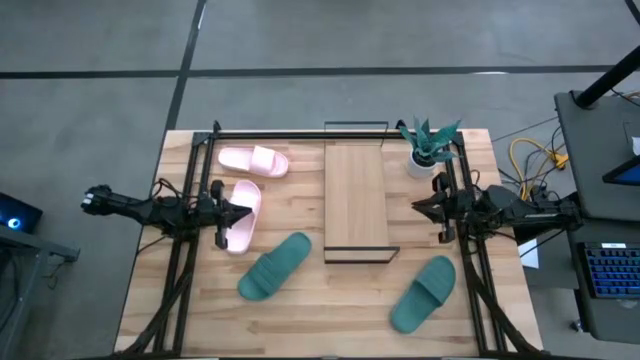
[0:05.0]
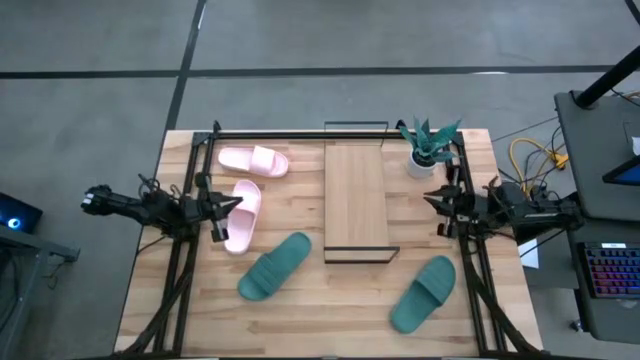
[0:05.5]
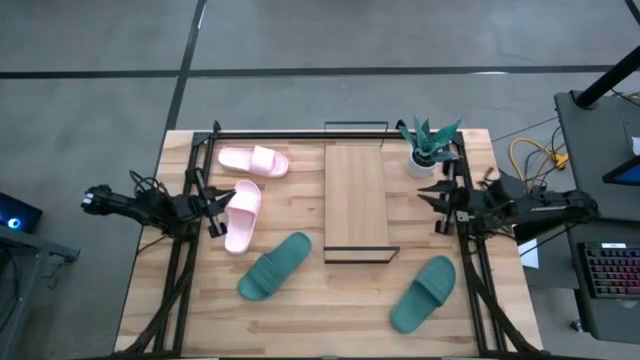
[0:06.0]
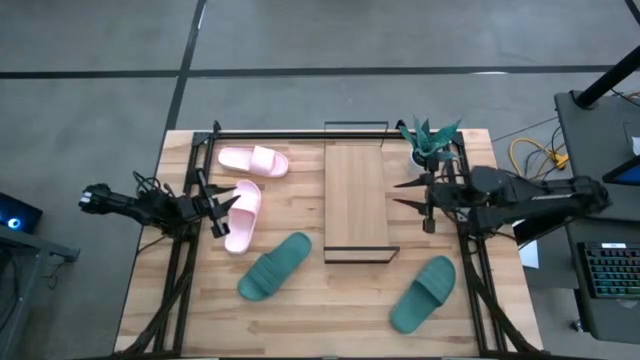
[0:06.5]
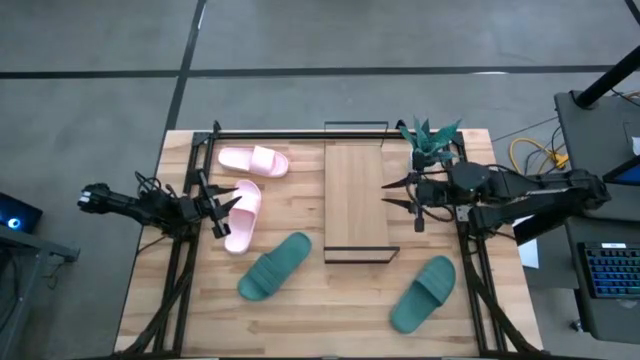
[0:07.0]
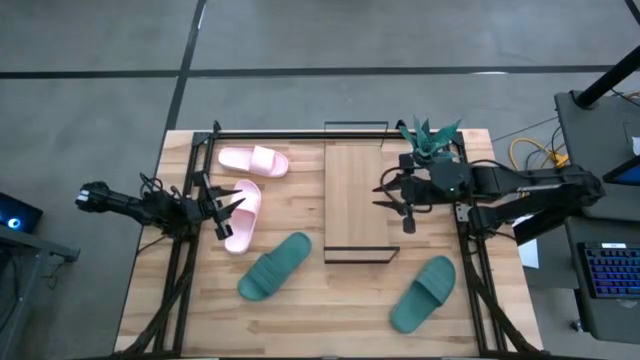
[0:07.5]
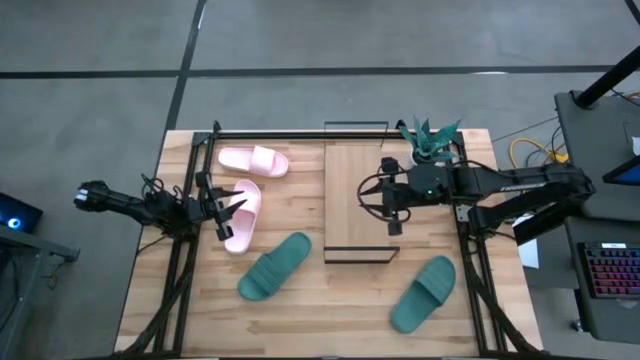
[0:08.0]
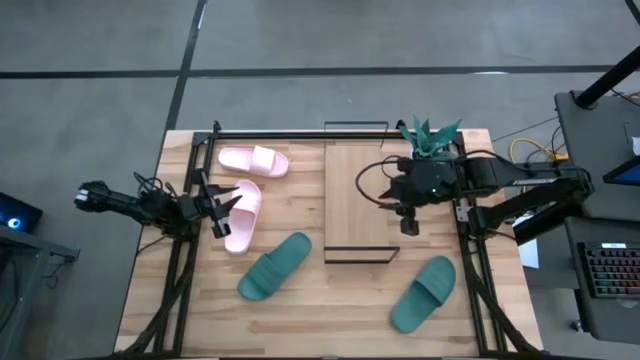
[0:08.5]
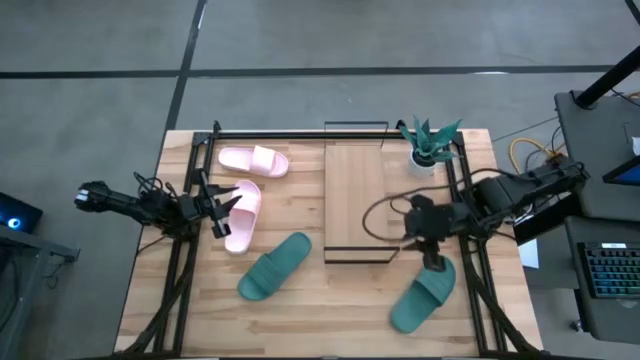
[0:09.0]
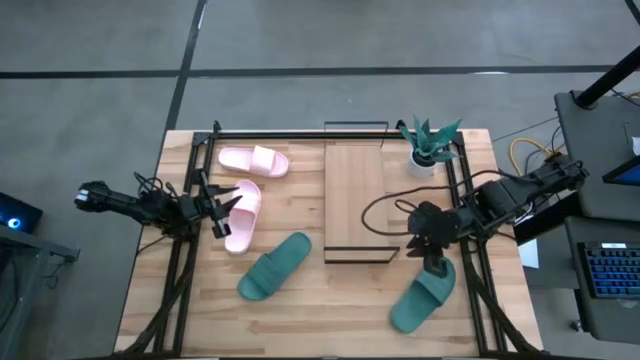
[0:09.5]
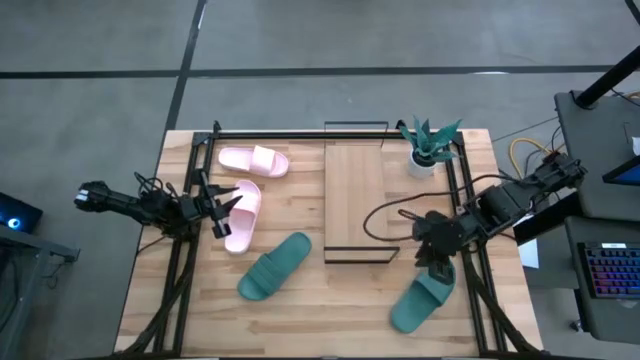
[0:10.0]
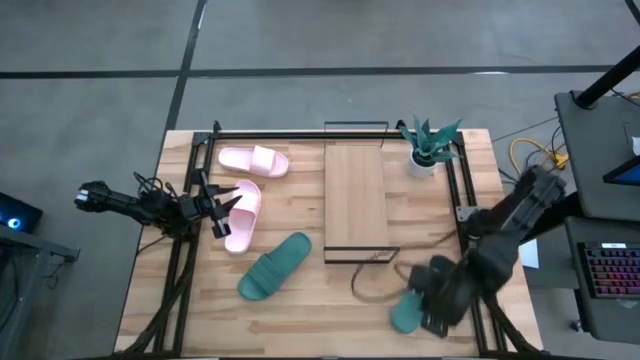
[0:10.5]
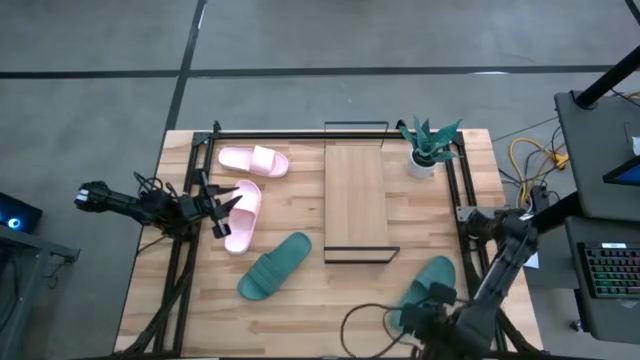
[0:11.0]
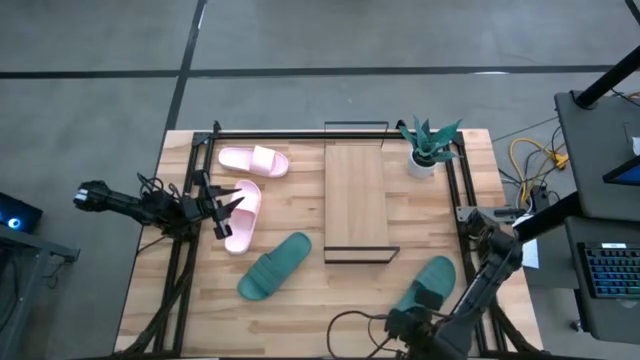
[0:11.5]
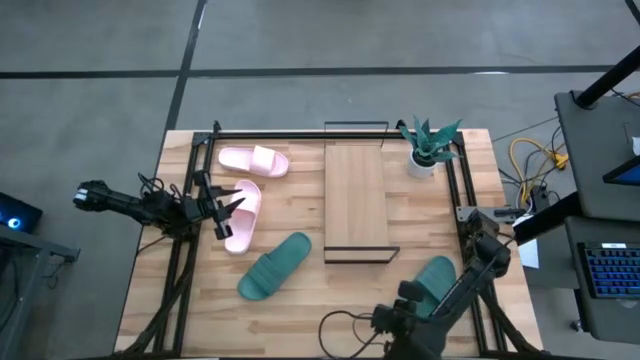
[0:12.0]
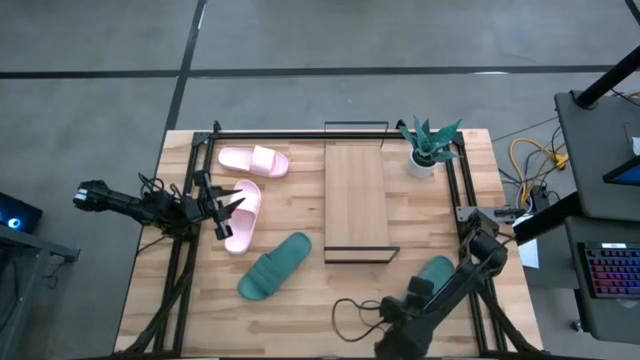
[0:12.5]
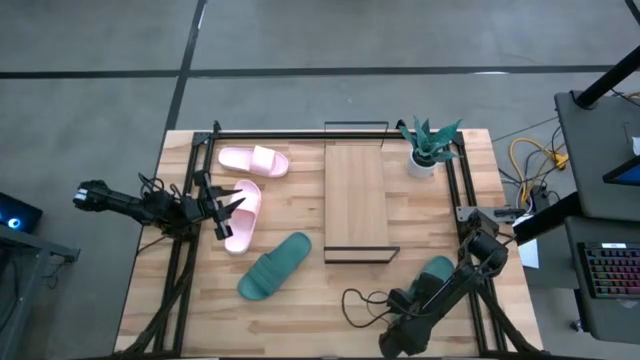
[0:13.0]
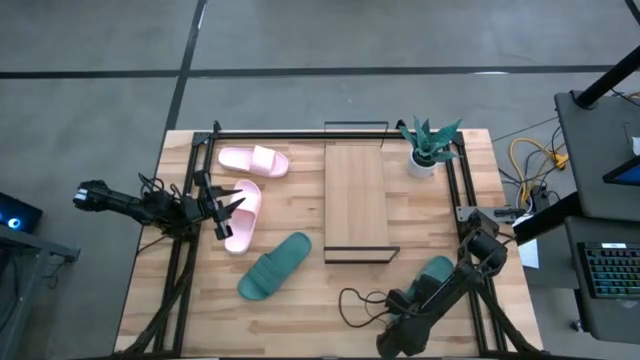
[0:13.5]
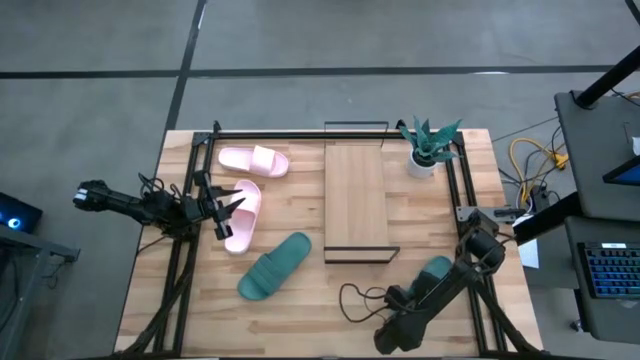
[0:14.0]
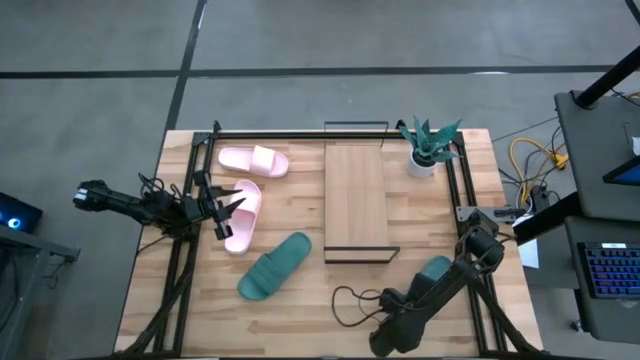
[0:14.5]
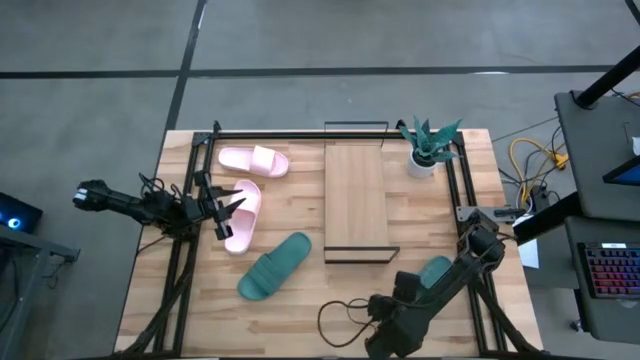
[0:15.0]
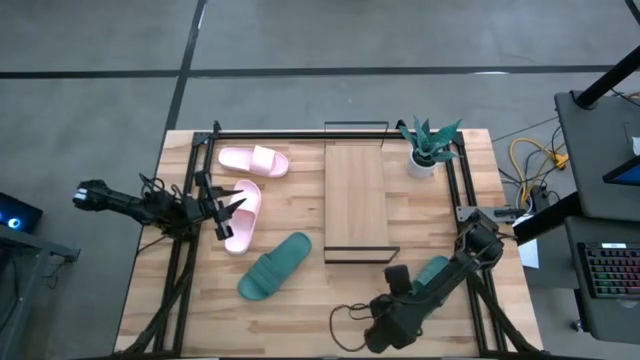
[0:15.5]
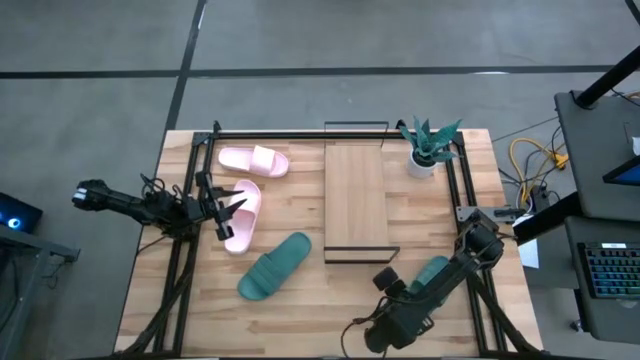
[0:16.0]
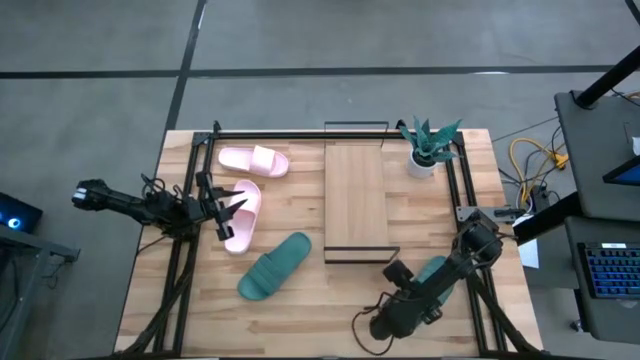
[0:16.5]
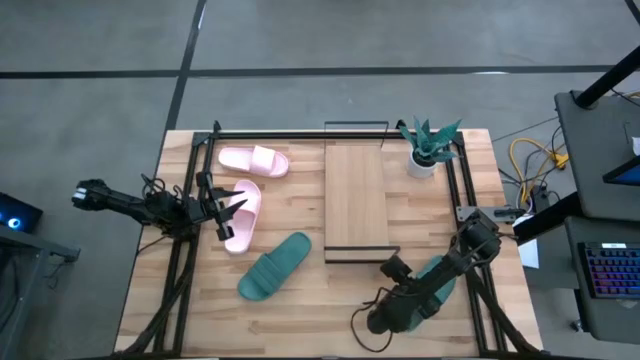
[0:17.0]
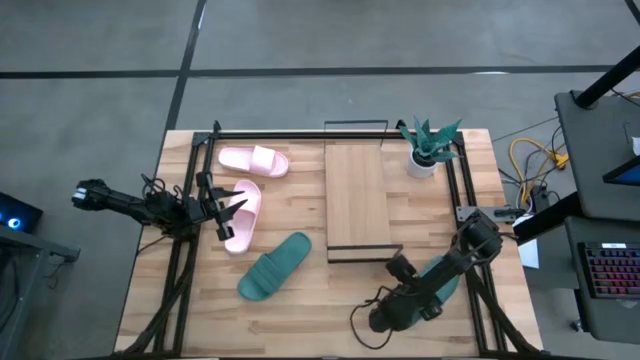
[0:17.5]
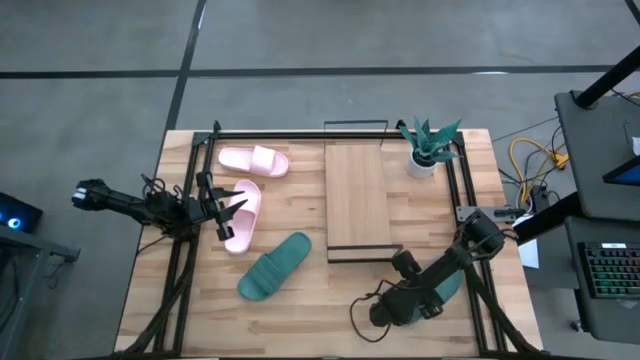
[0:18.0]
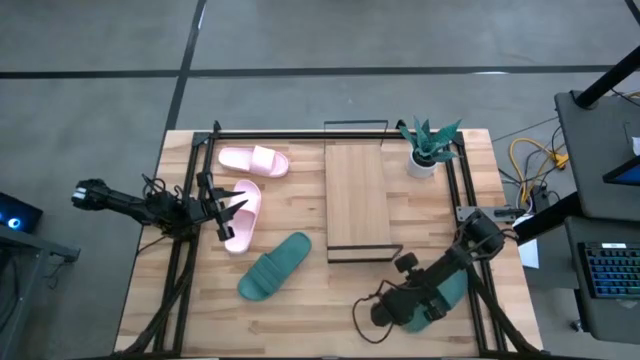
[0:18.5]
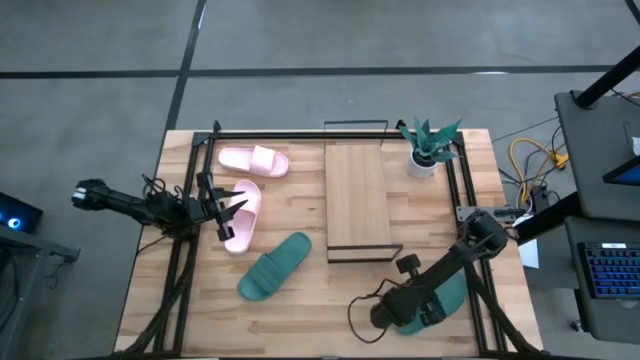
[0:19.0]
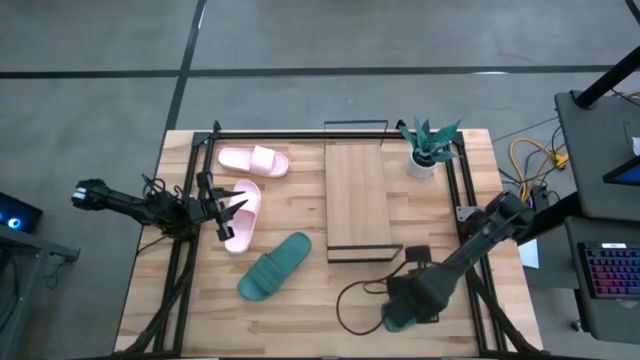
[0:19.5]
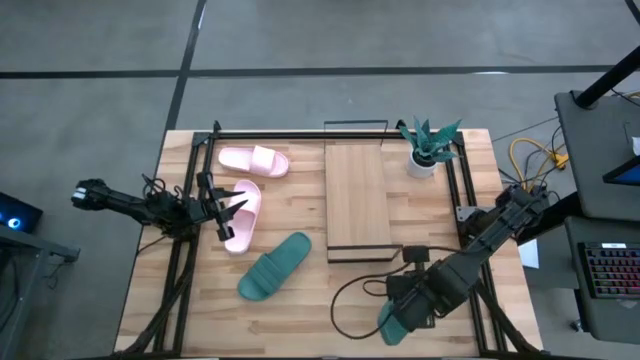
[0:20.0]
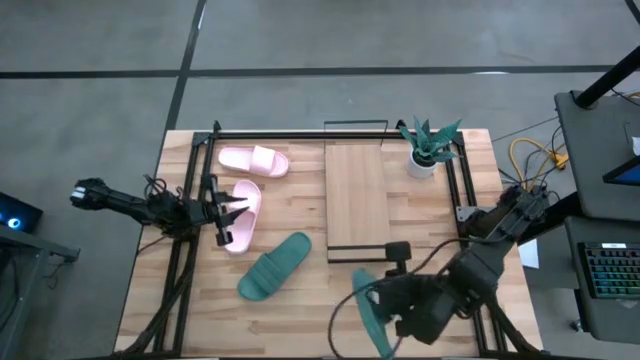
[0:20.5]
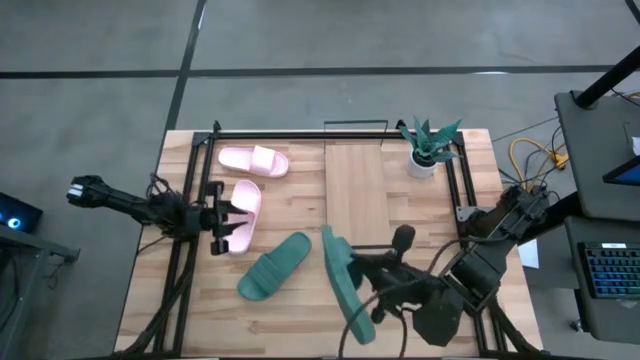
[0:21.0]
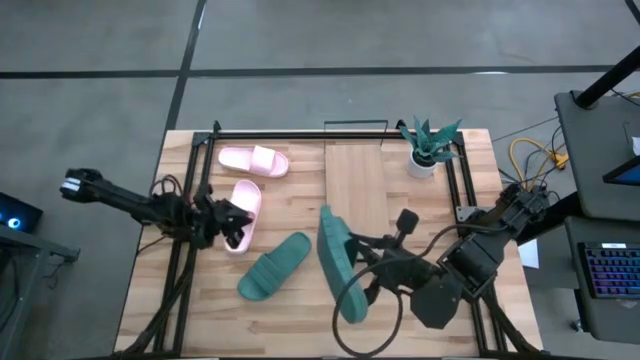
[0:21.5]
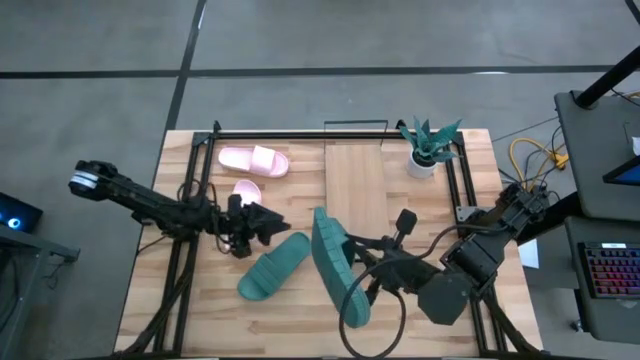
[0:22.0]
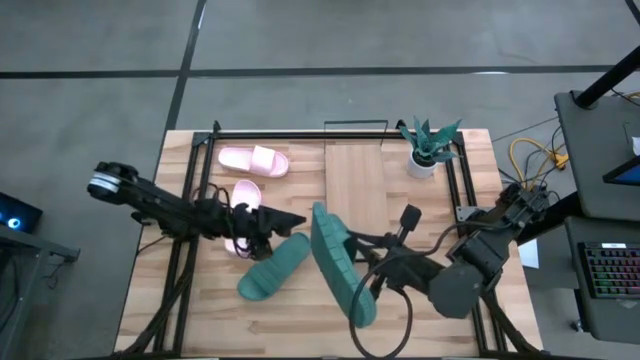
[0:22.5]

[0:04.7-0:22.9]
Task: Pick and place slides into the shelf
Put the right green slipper on the shelf
